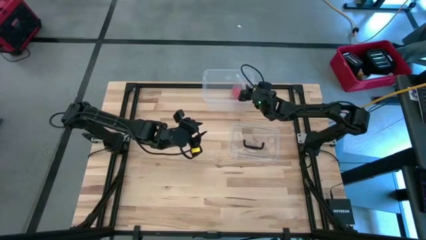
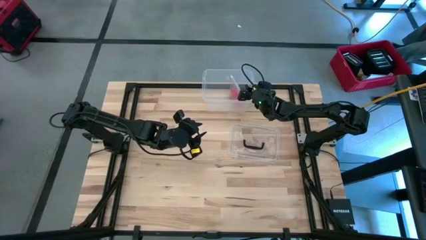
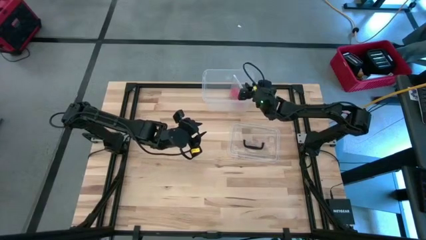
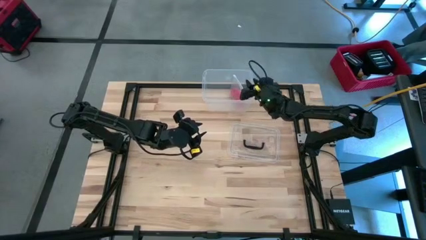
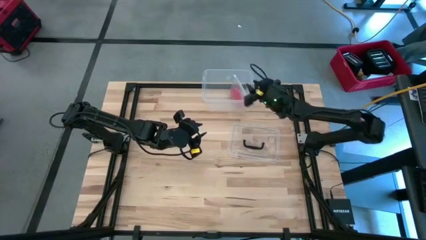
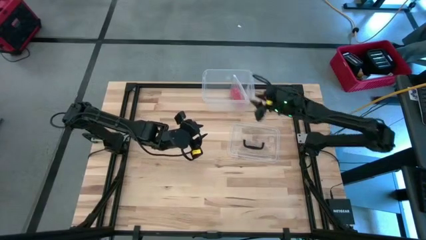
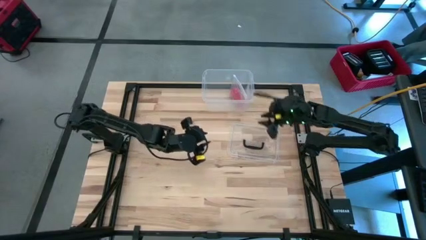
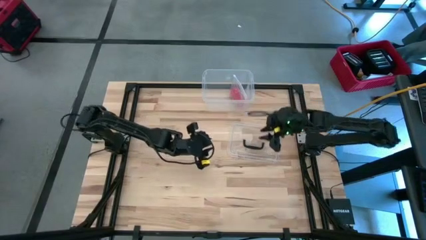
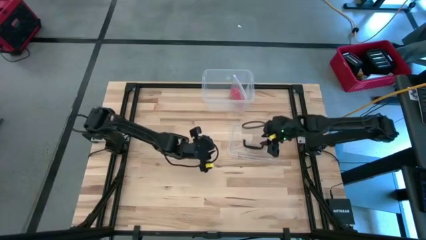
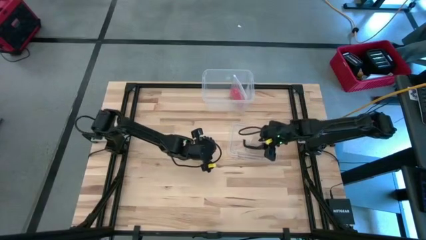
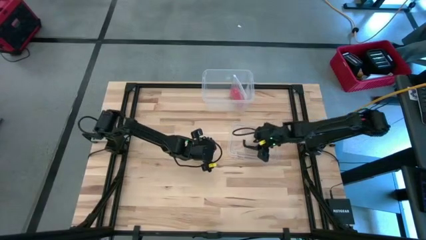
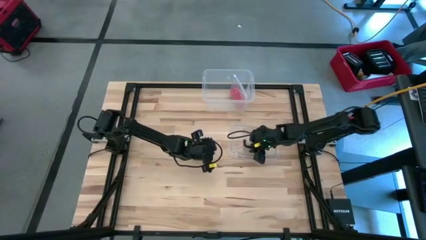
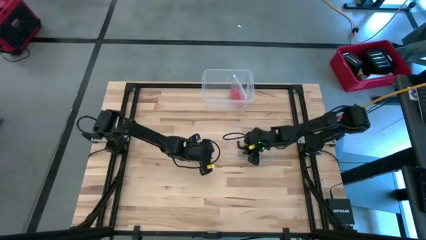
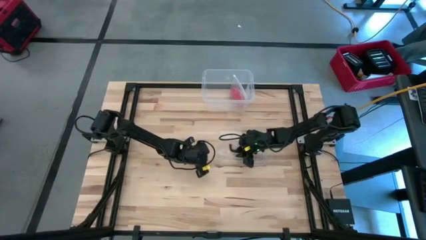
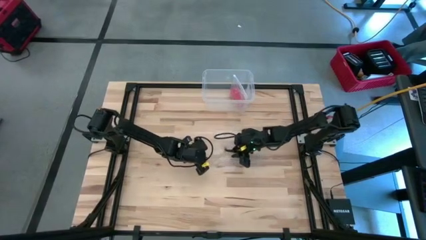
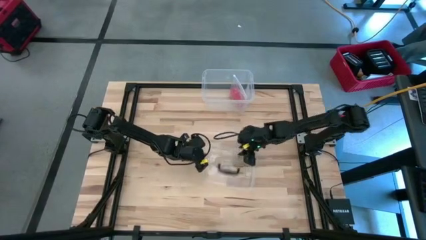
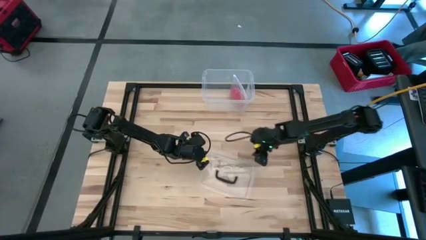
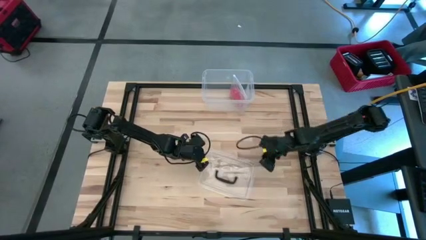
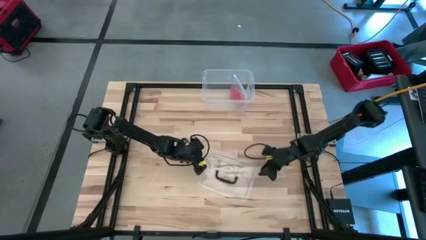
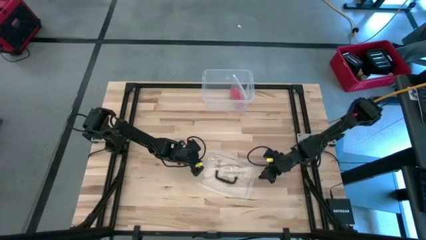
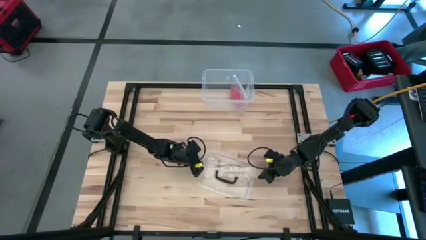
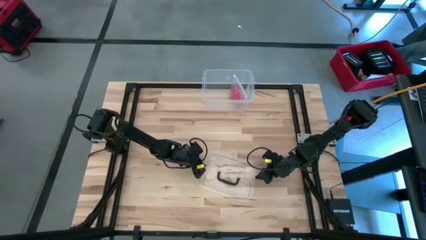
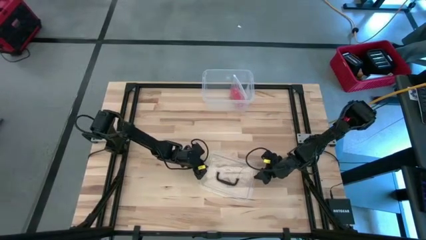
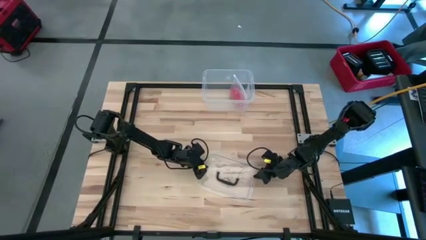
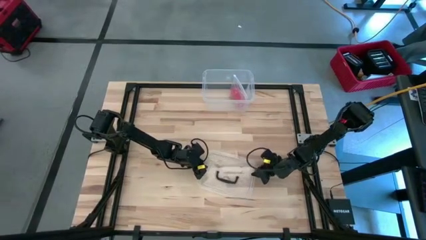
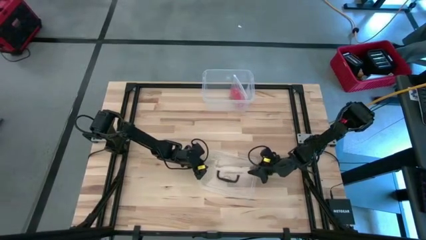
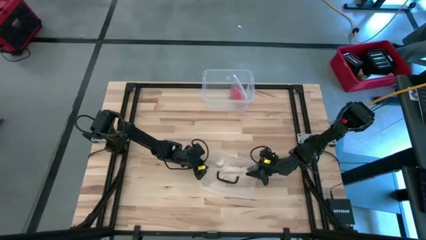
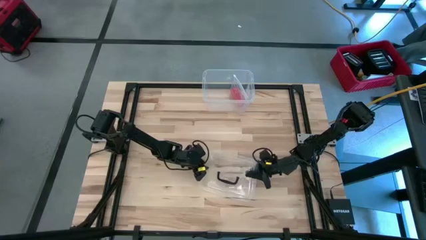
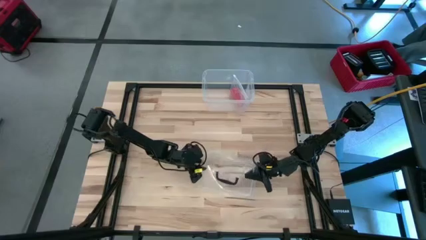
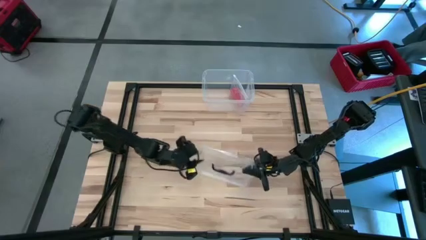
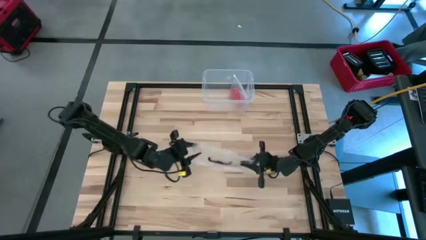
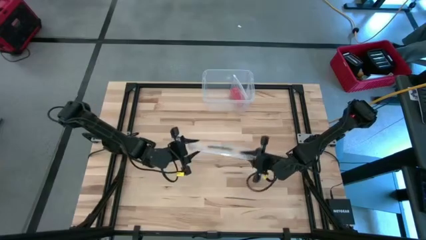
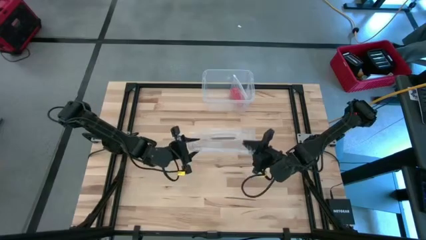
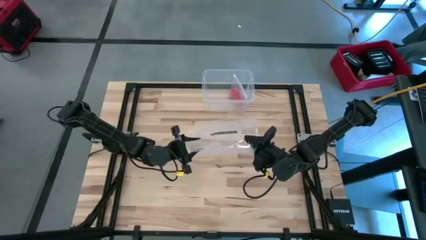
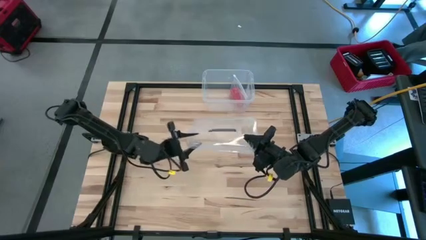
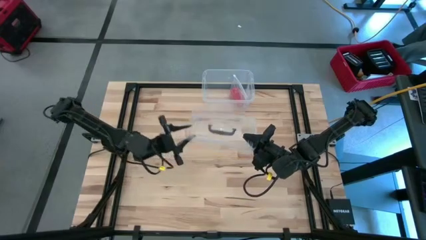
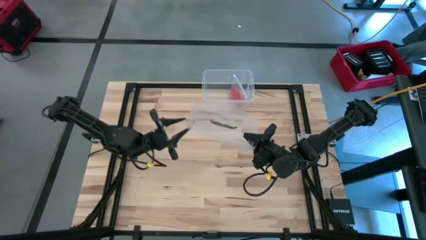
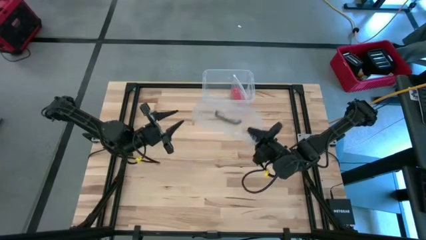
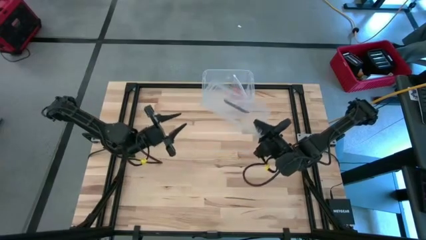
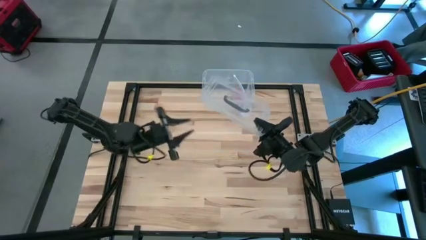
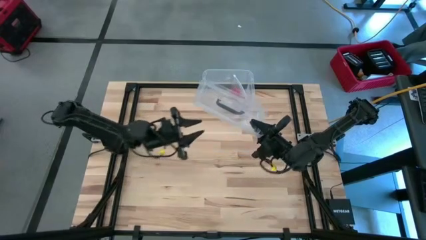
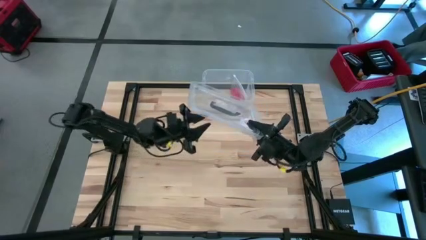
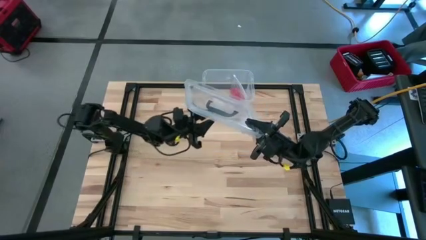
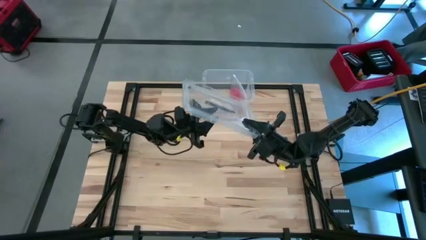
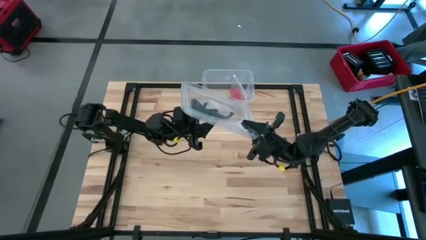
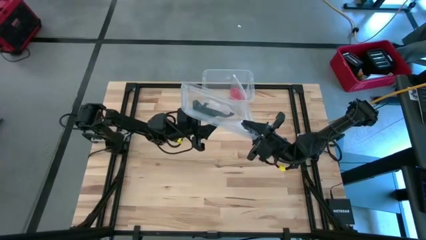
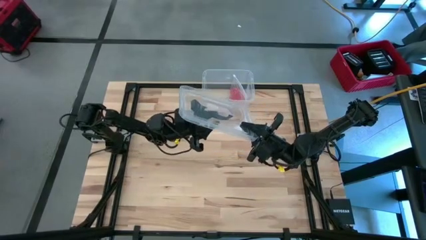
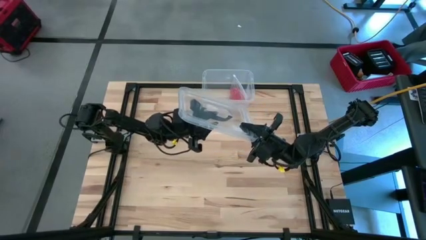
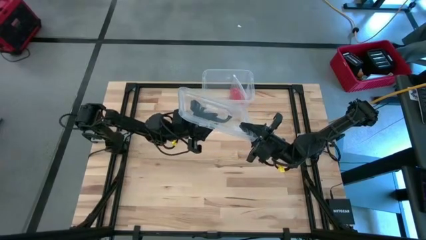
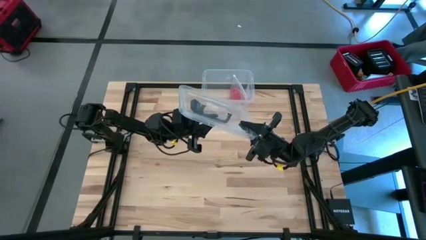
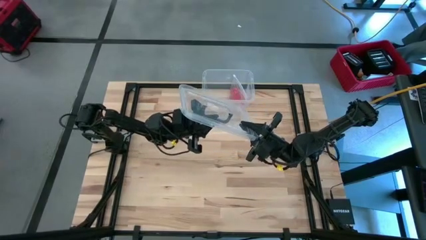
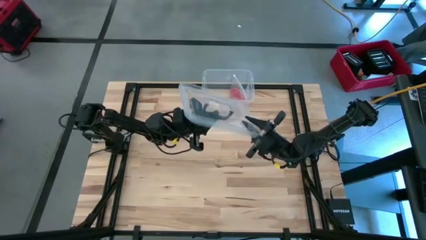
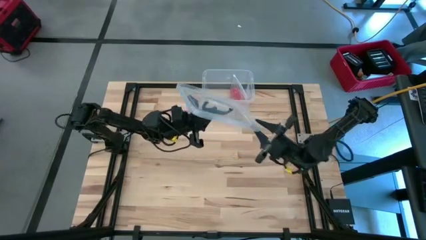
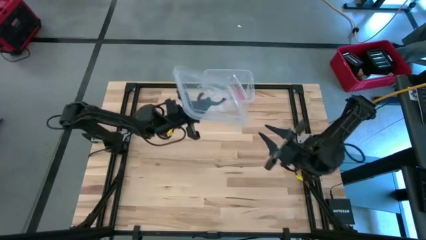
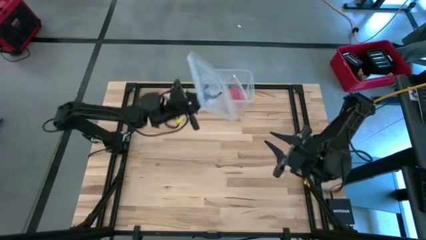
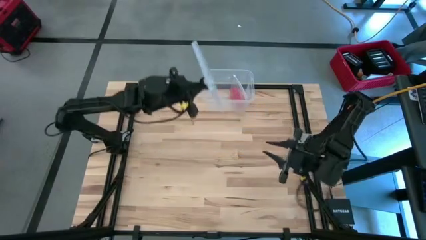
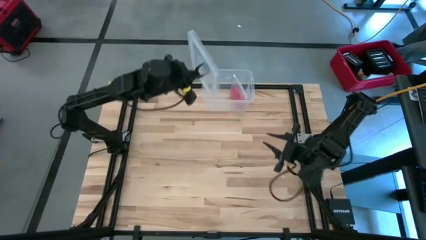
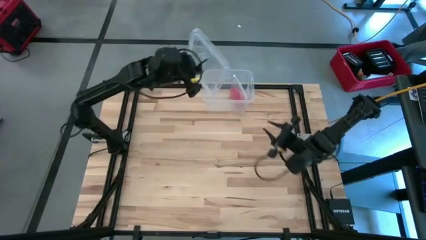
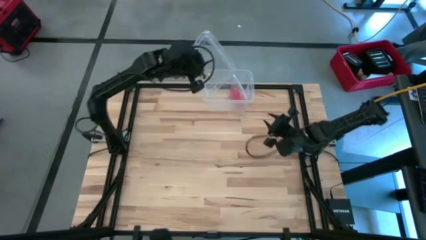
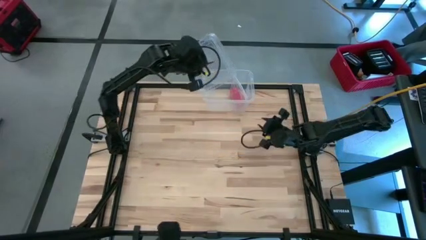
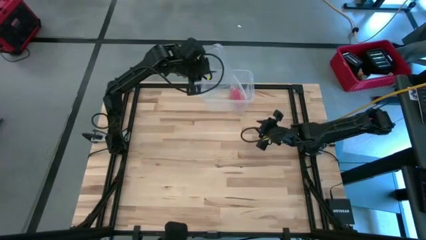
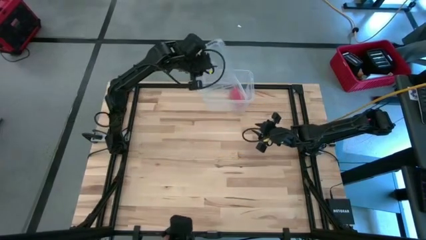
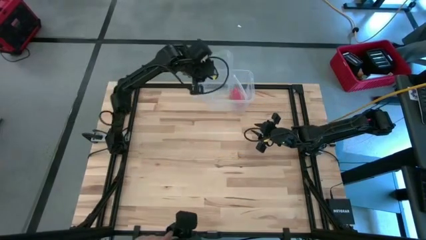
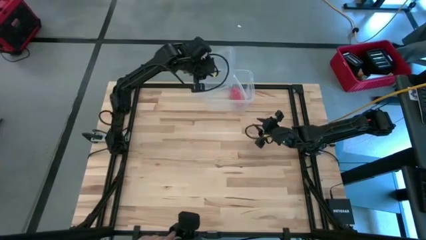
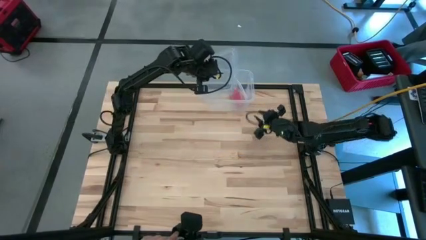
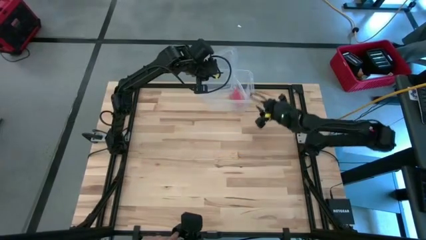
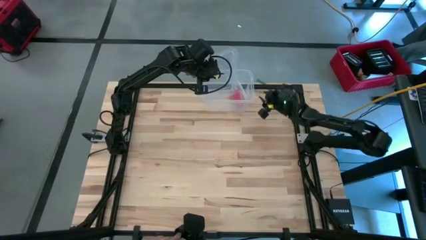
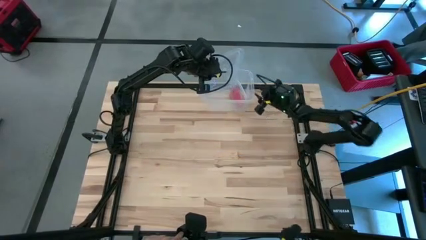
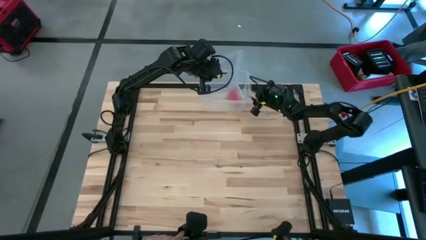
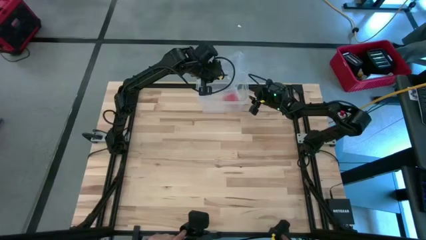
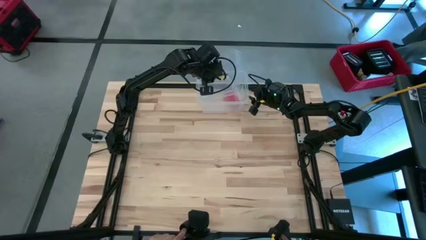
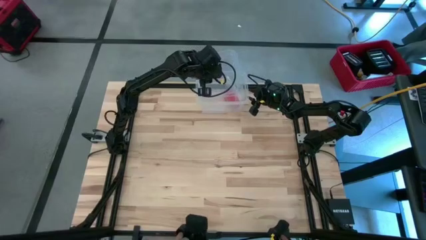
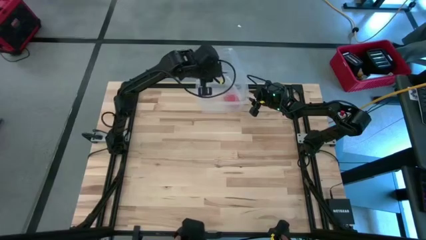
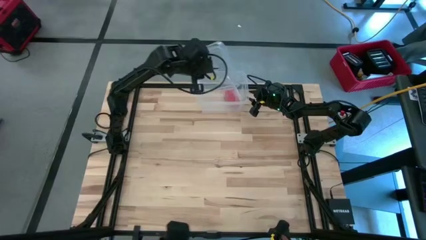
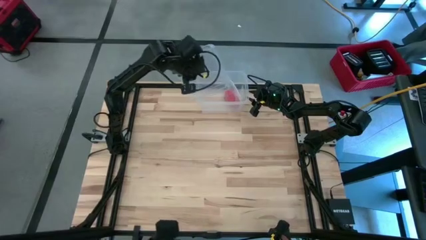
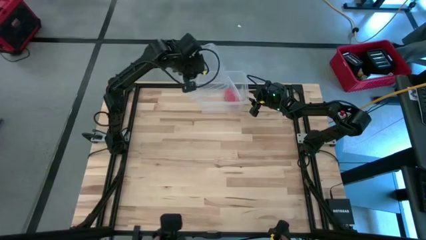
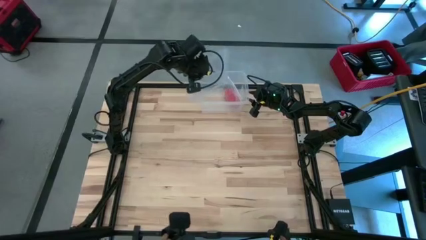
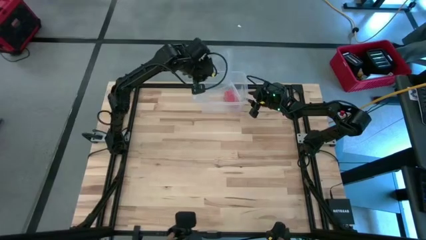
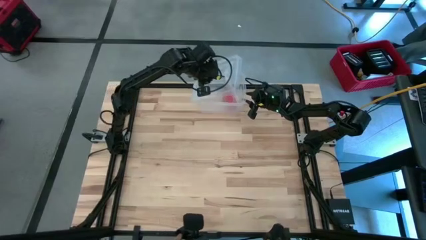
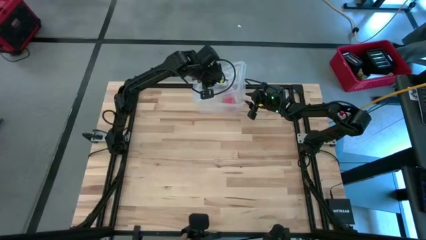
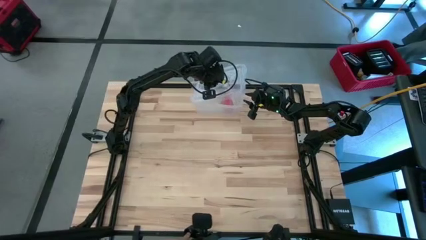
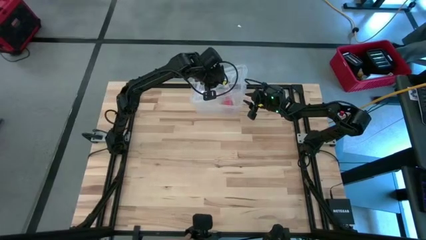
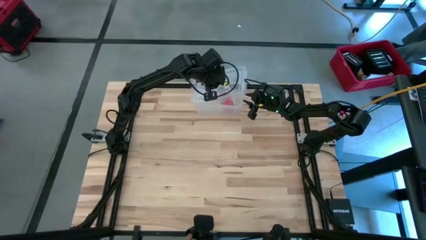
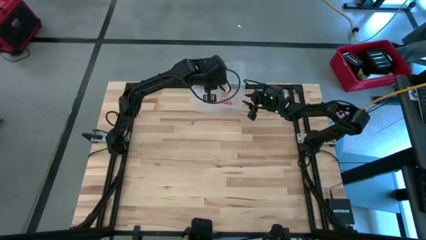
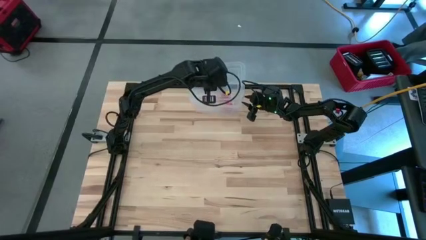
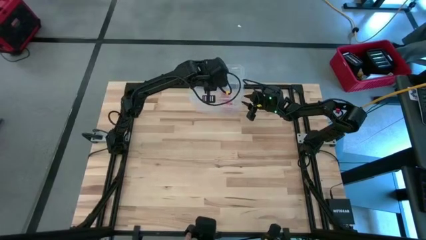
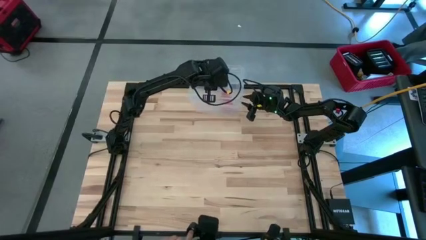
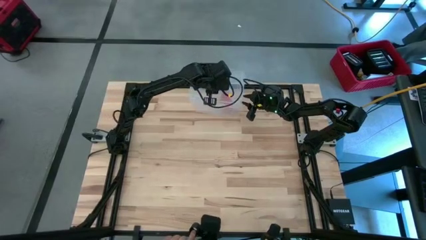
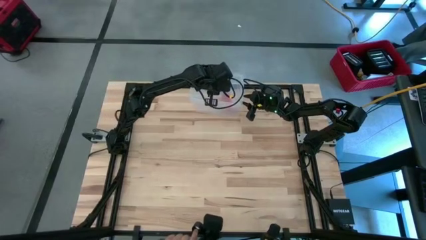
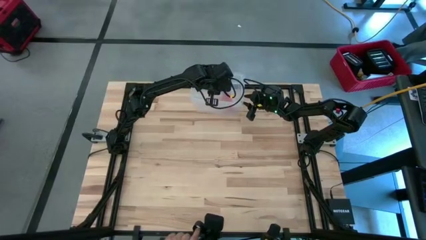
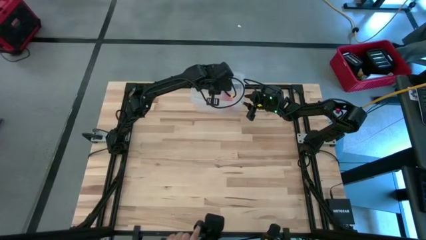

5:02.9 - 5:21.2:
Task: Roll bandage
Close the transparent bin
